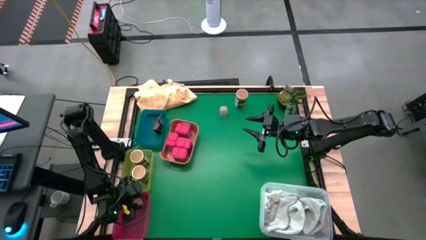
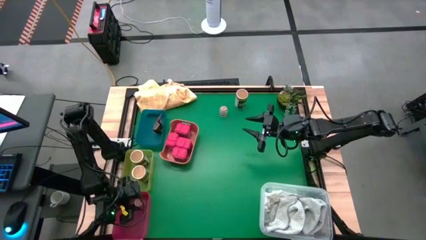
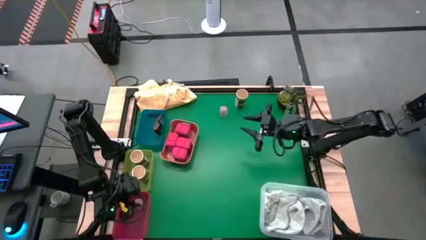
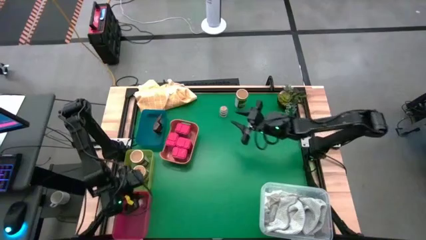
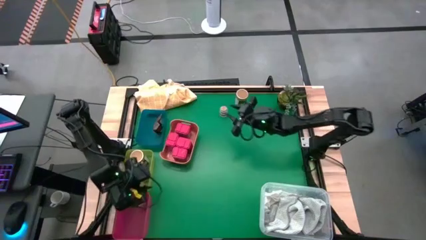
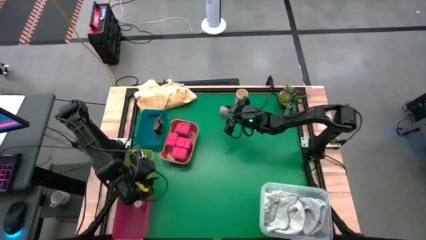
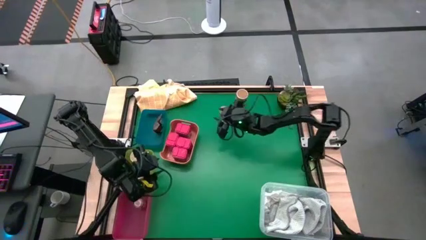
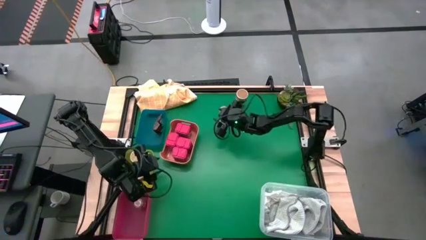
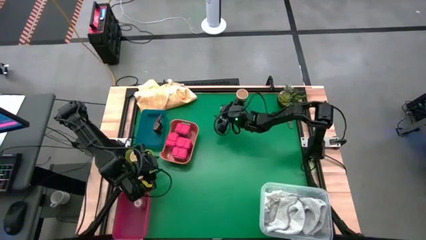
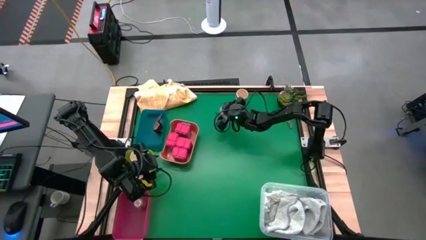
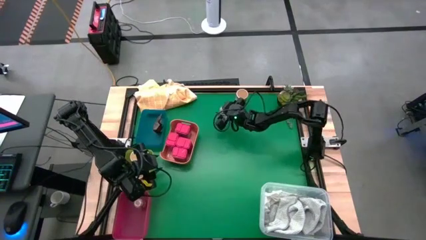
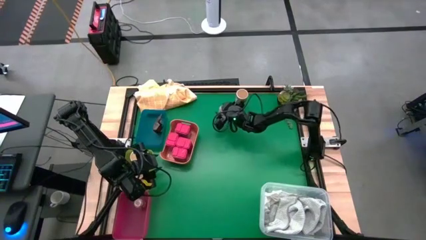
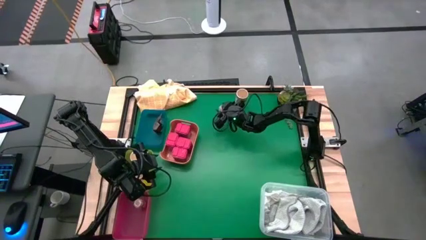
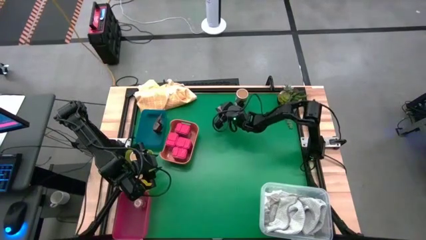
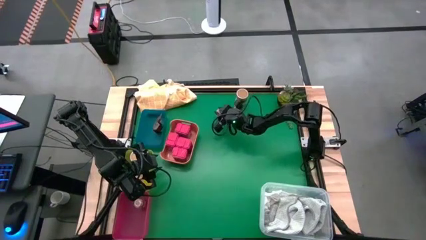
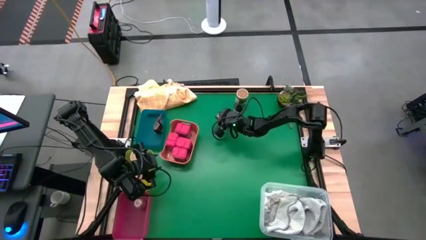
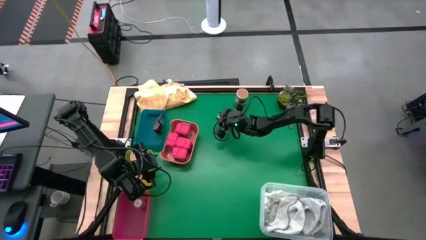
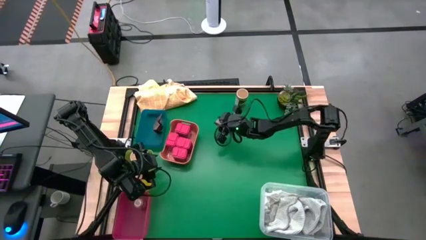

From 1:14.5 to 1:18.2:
Task: Sort spices by type
Put the brown seasoning bottle into the red bin

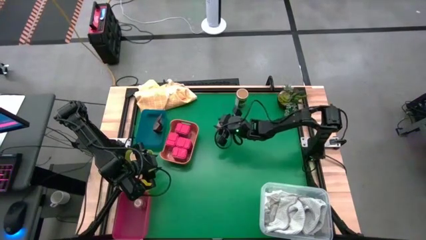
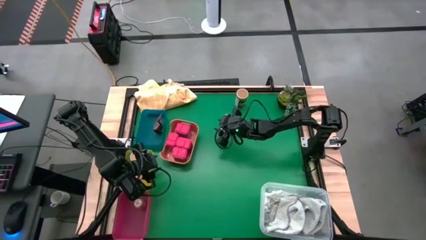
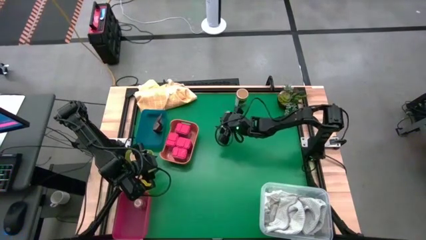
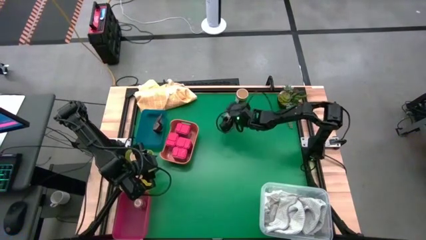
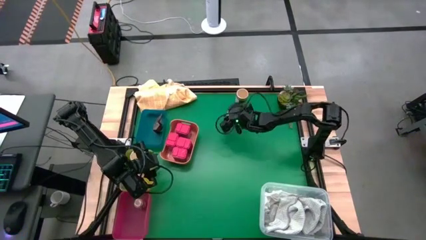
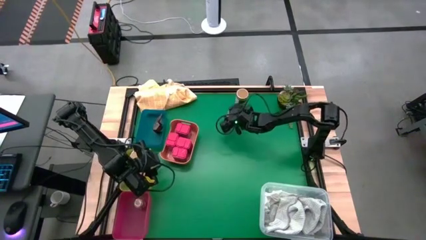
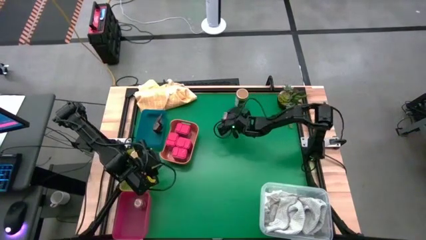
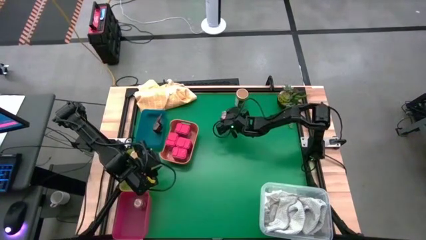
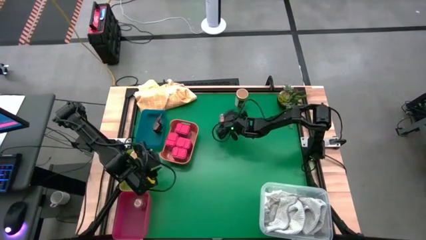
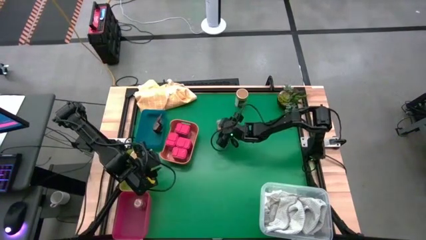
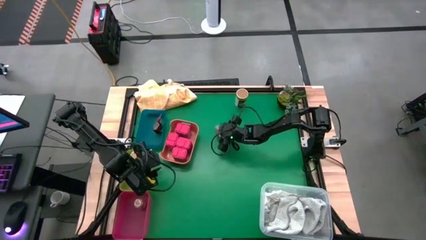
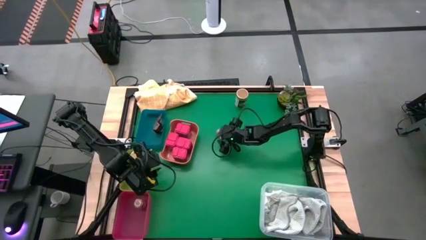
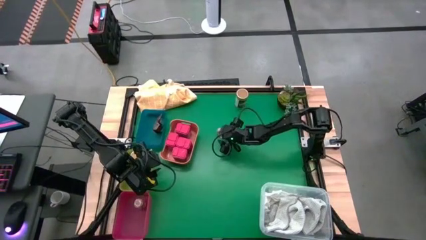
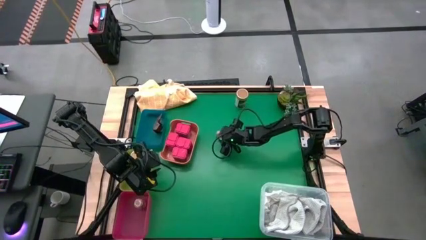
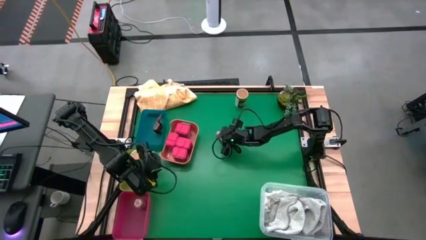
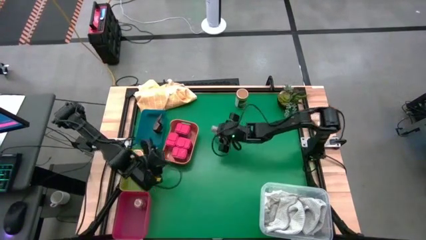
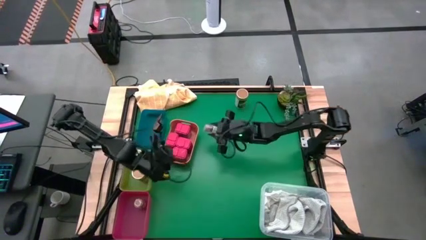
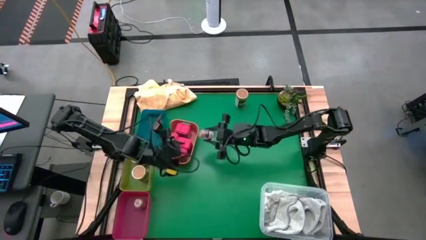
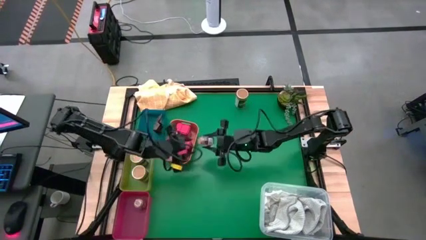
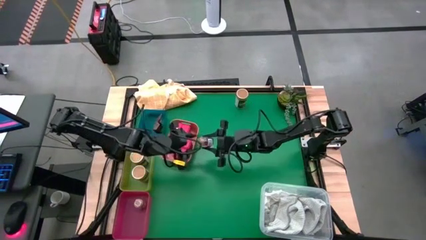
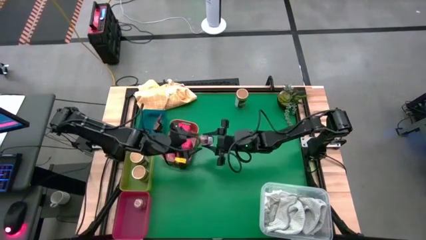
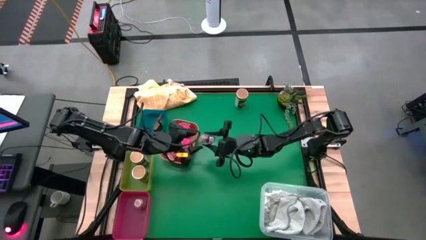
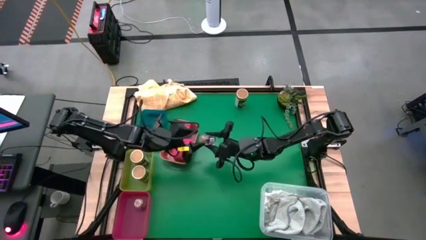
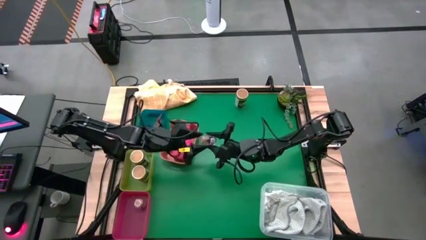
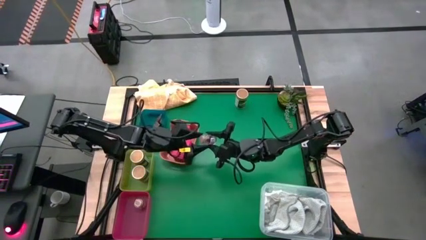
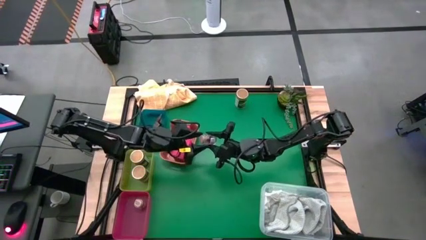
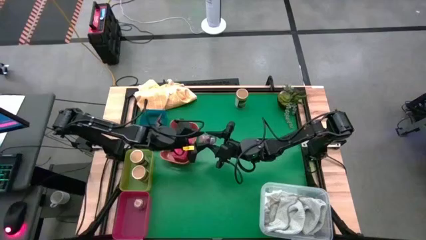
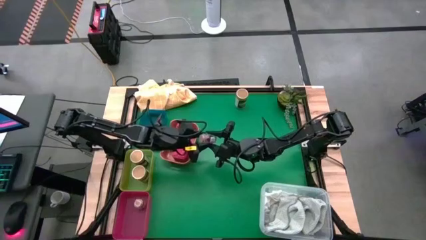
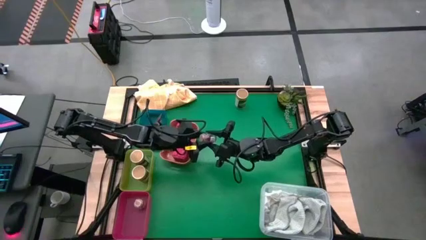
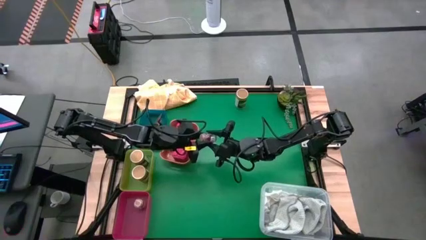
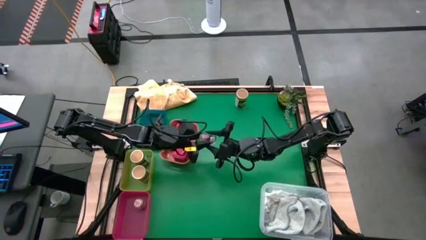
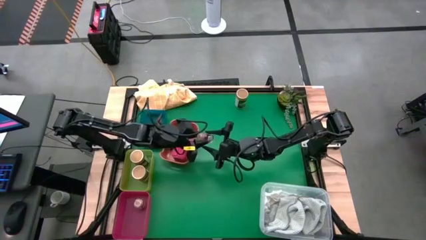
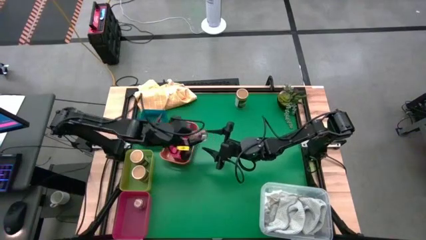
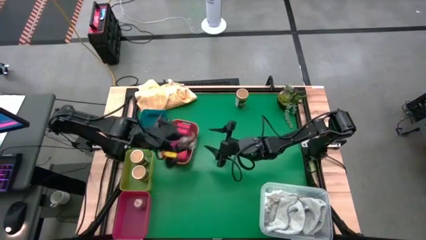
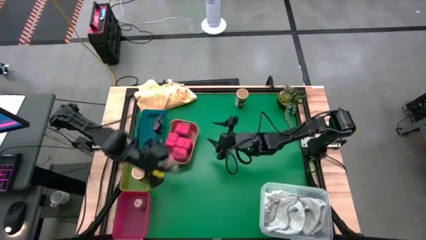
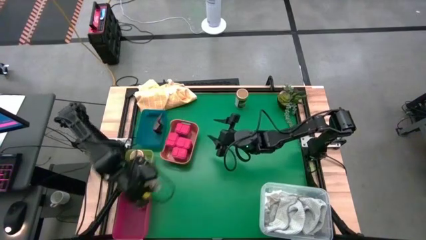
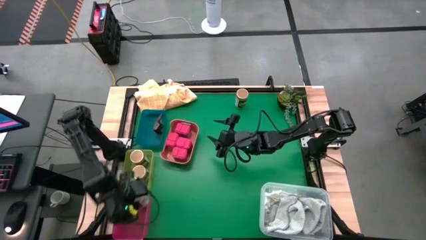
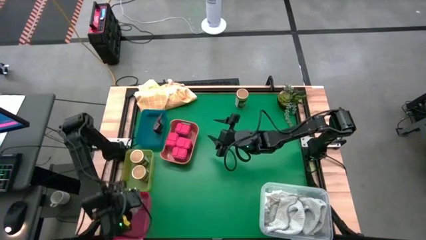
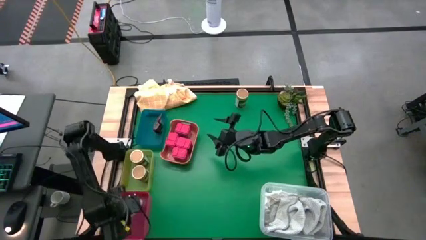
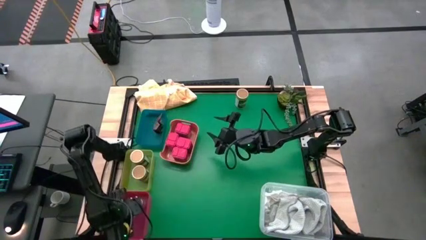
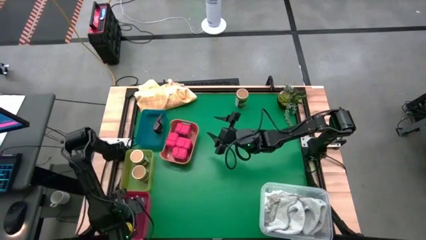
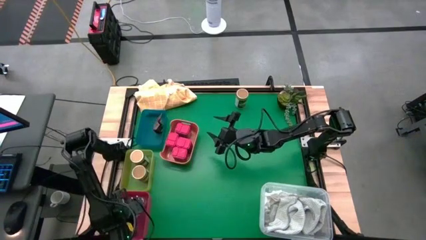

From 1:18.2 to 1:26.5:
Put the brown seasoning bottle into the red bin
